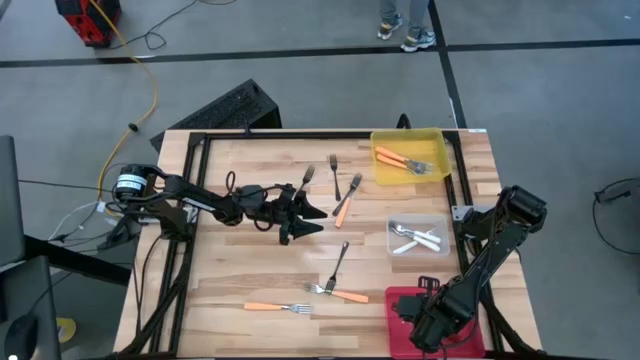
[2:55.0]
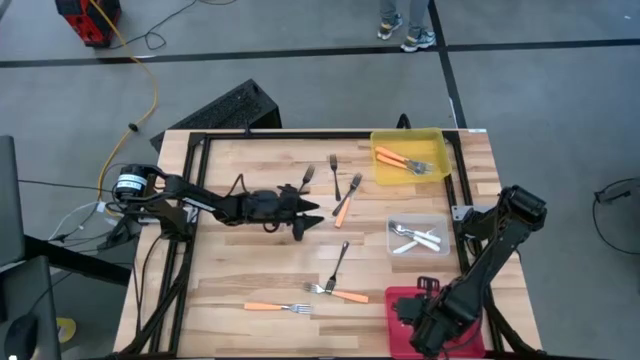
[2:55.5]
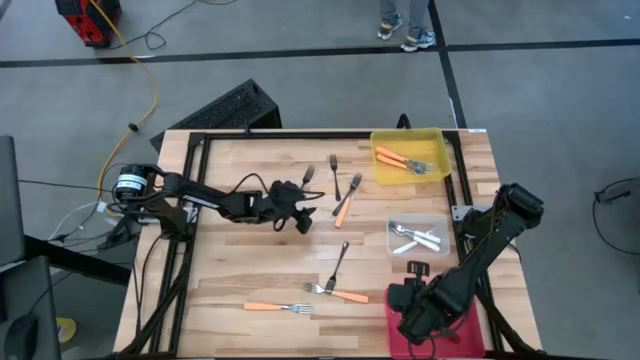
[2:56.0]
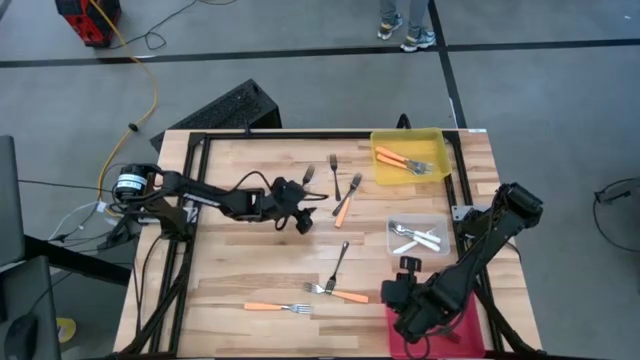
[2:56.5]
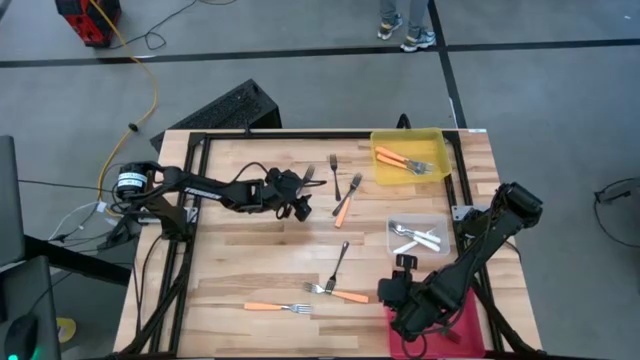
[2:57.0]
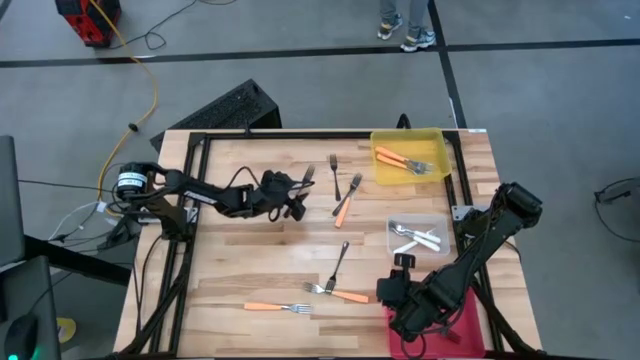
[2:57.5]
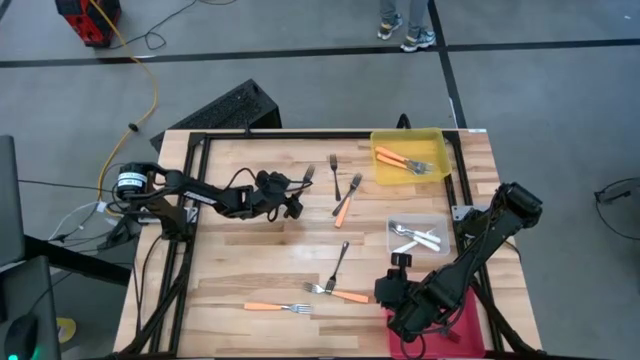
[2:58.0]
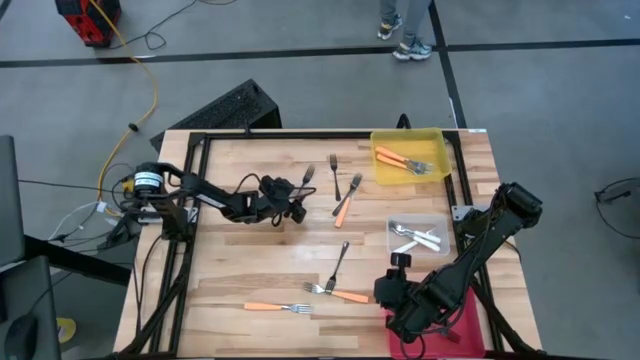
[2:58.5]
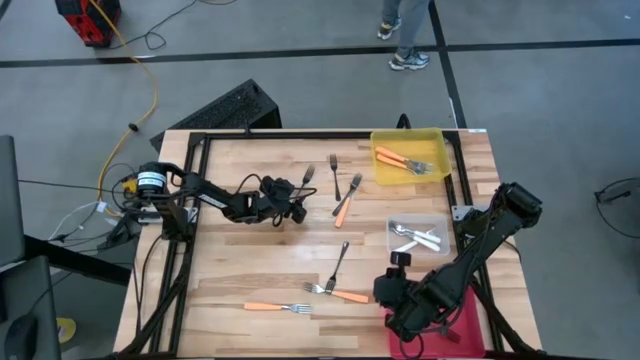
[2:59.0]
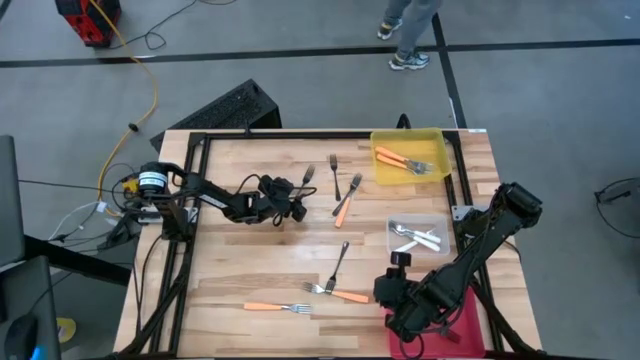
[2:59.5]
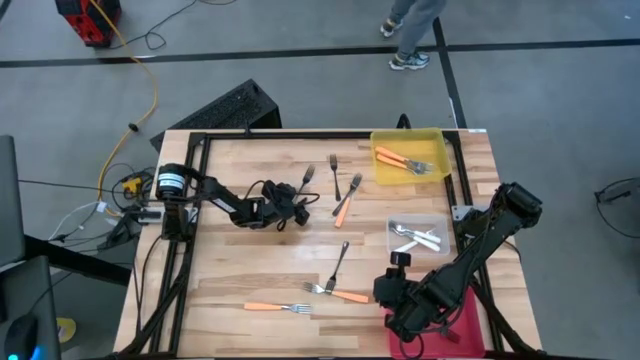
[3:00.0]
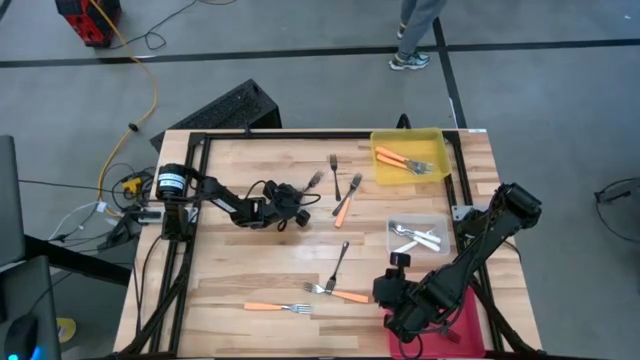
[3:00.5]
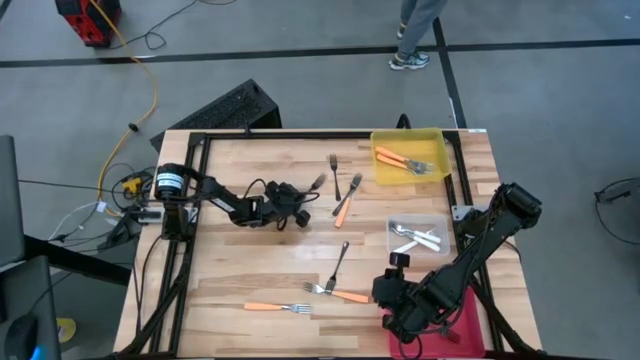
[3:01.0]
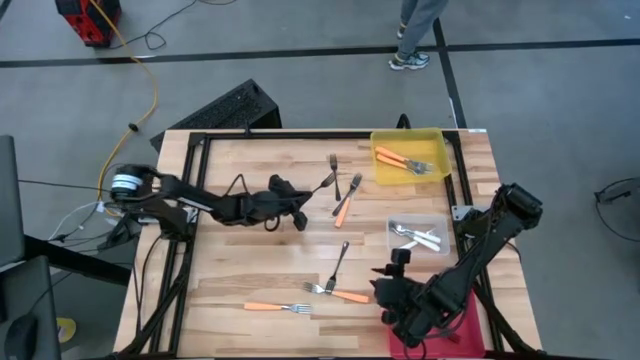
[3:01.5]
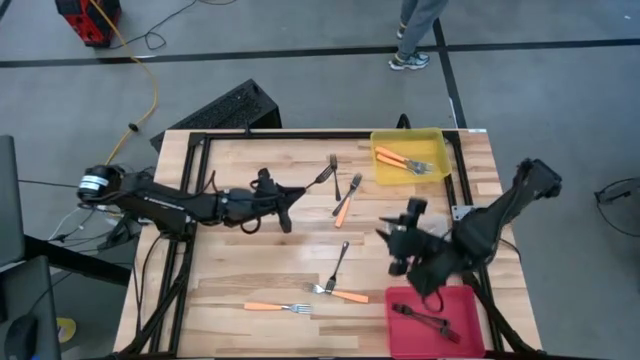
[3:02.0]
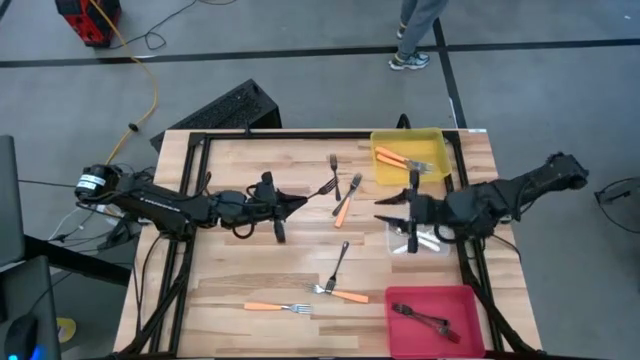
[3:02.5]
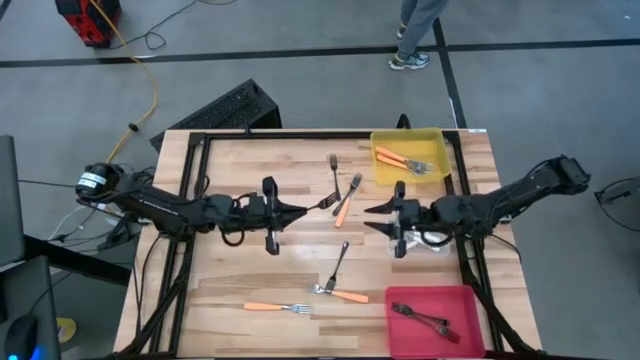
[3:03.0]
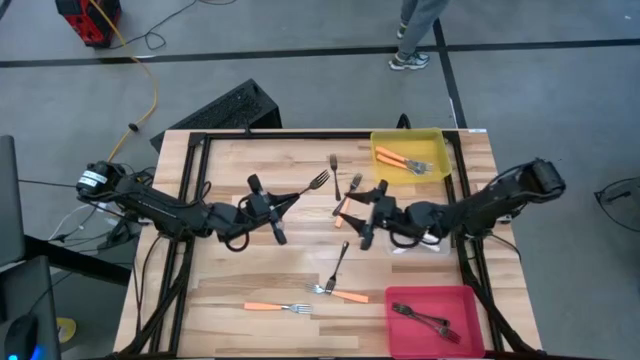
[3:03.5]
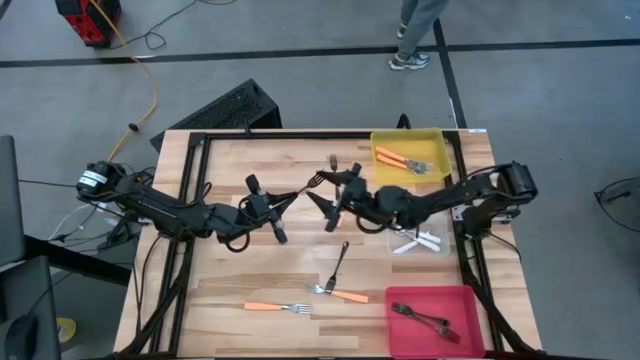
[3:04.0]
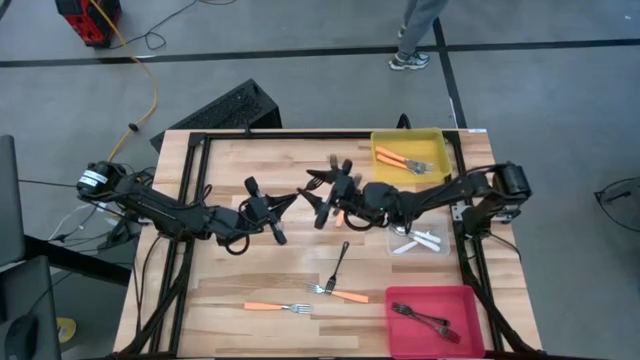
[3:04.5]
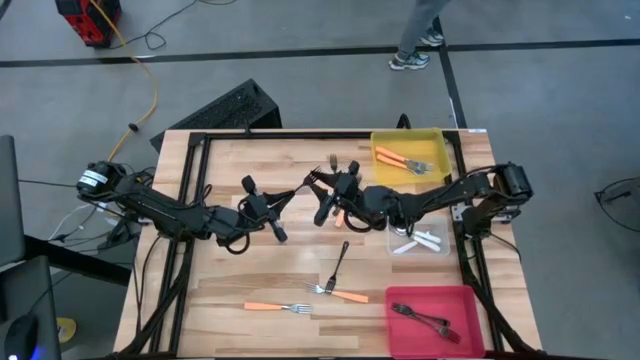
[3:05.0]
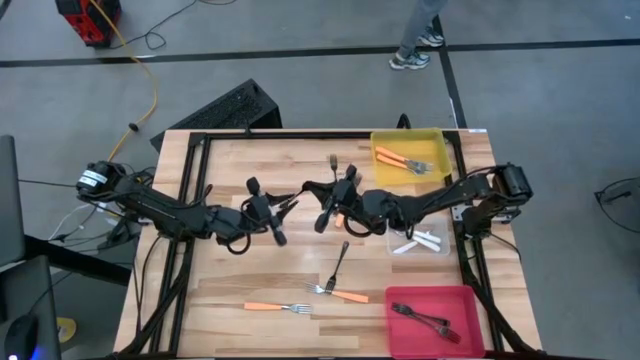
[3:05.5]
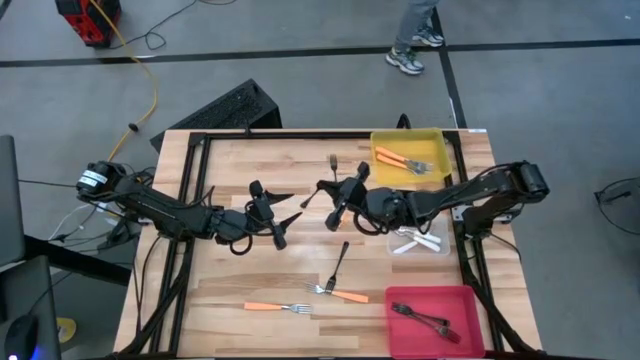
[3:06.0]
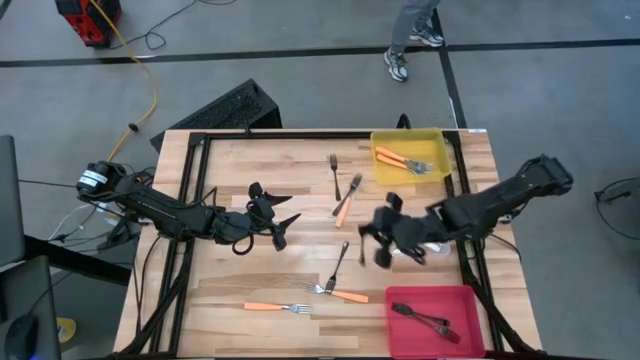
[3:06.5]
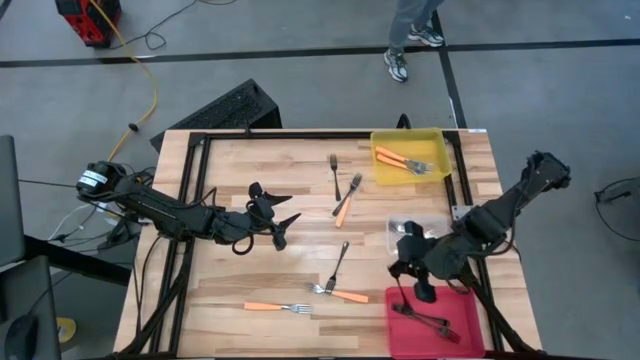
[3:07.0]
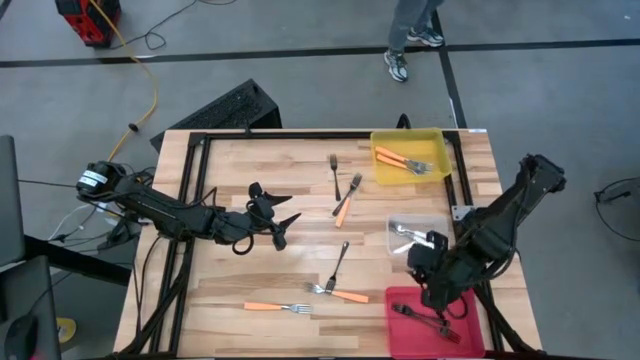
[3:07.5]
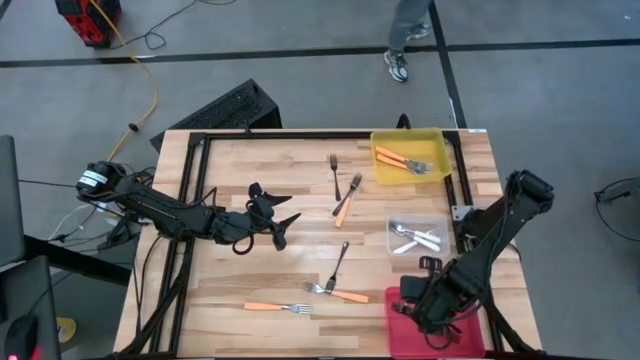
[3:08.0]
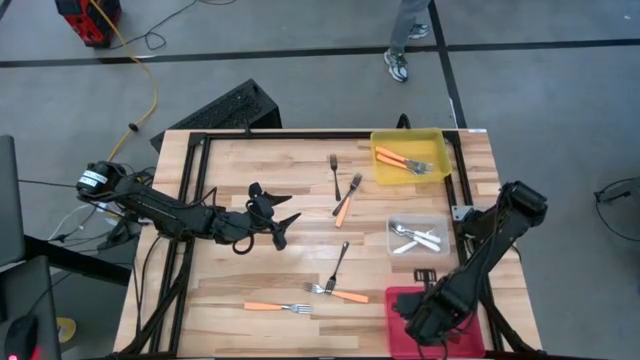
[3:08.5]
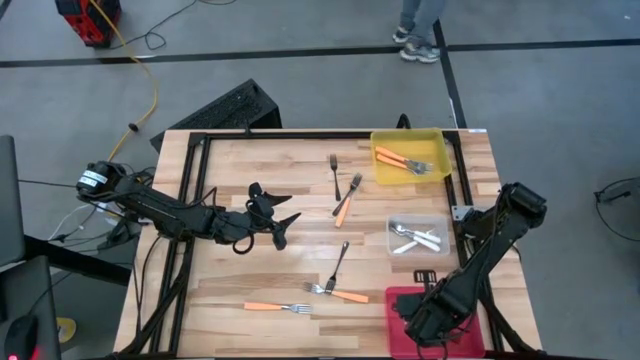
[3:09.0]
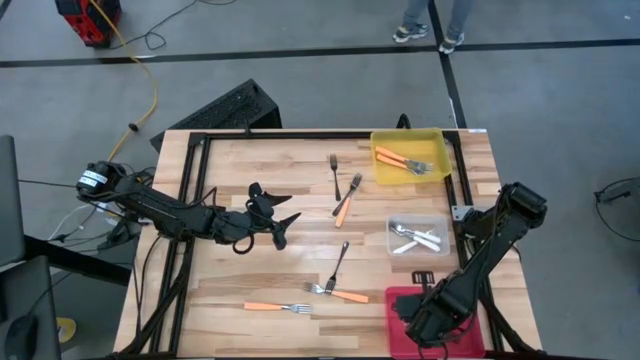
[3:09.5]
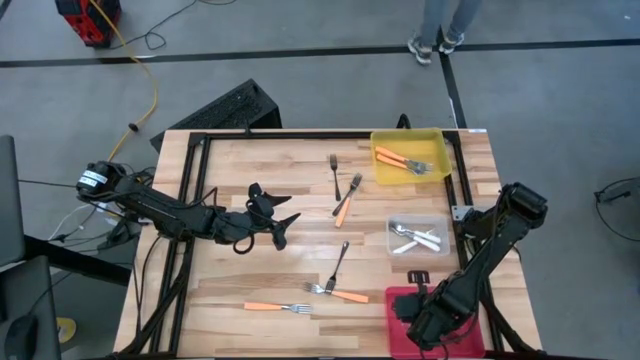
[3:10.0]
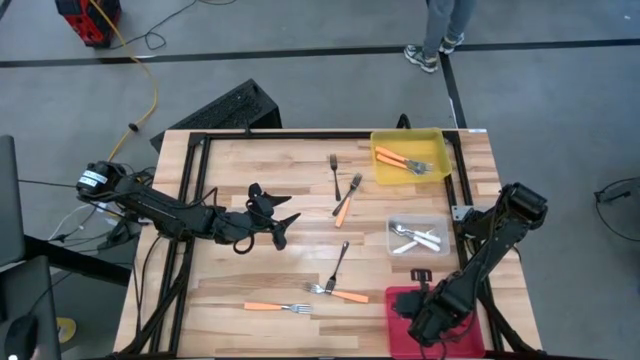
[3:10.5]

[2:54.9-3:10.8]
Task: Sort silverware by color (type)
Put the black fork into the red bin

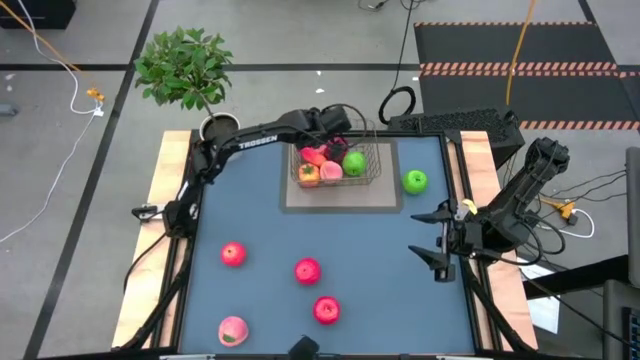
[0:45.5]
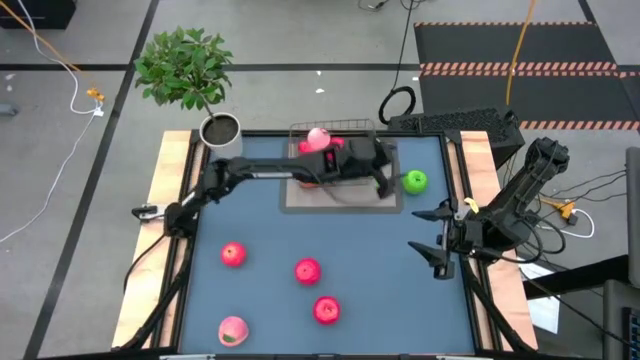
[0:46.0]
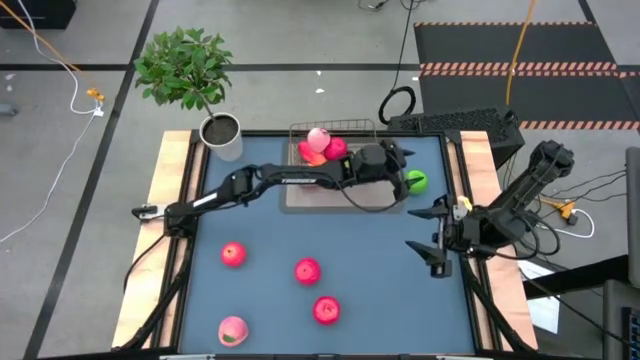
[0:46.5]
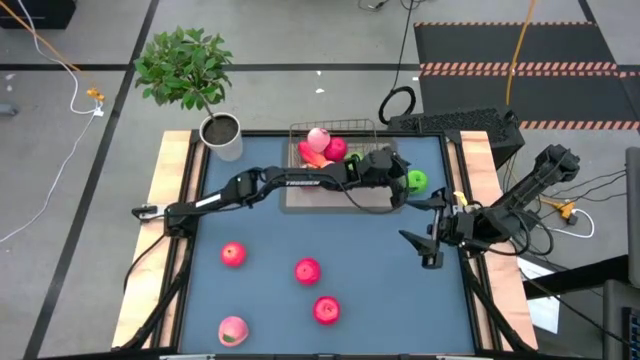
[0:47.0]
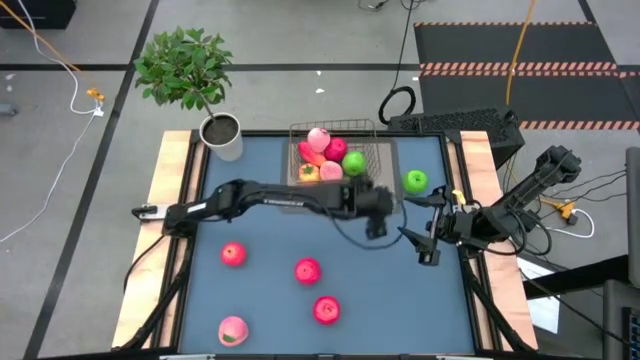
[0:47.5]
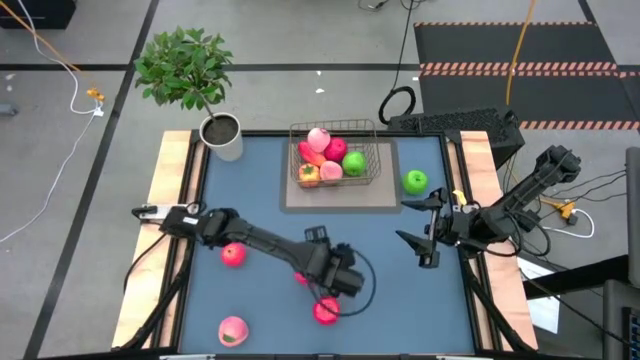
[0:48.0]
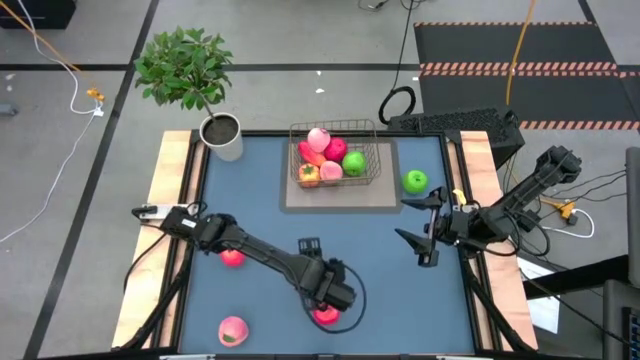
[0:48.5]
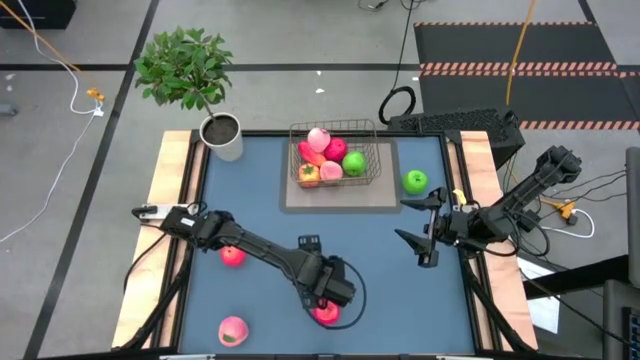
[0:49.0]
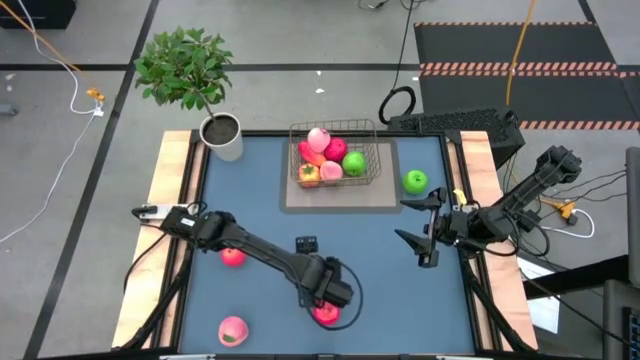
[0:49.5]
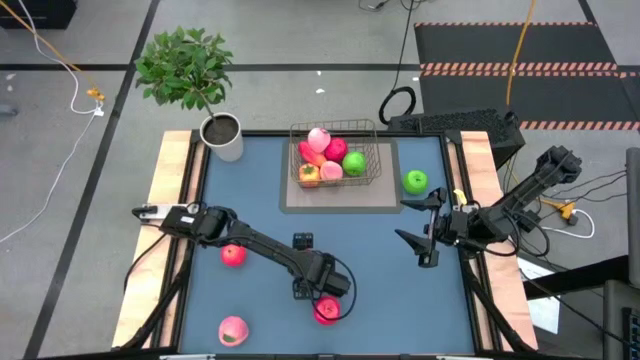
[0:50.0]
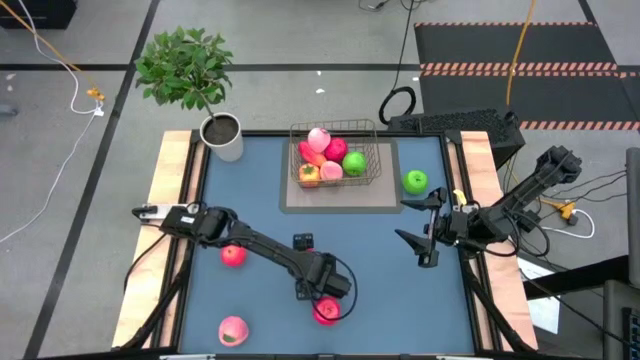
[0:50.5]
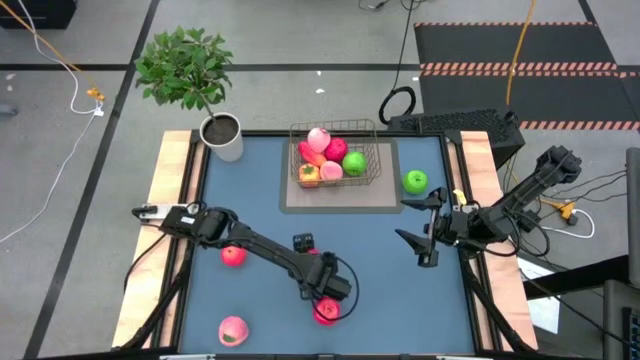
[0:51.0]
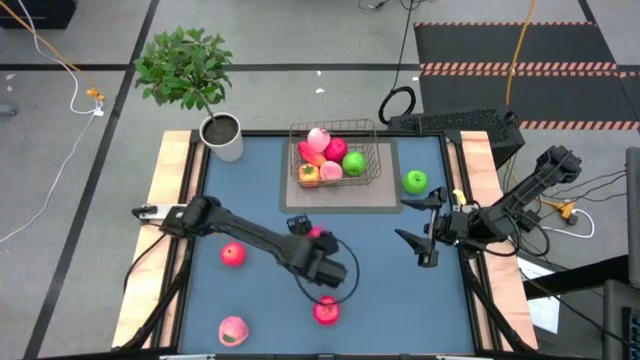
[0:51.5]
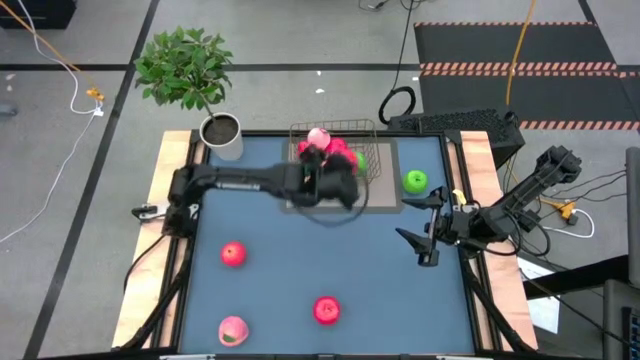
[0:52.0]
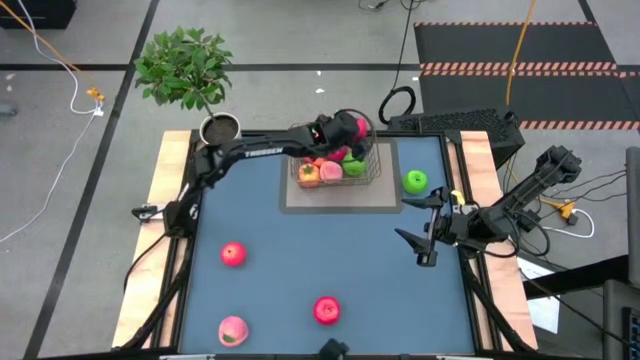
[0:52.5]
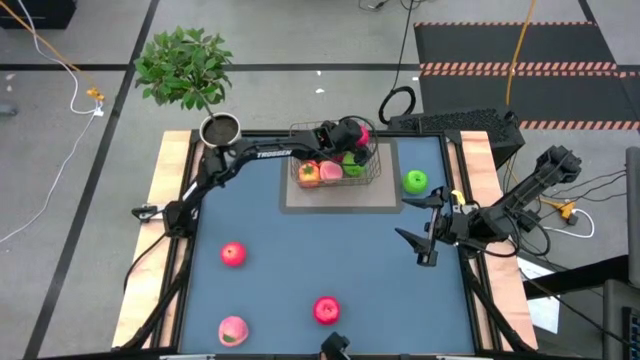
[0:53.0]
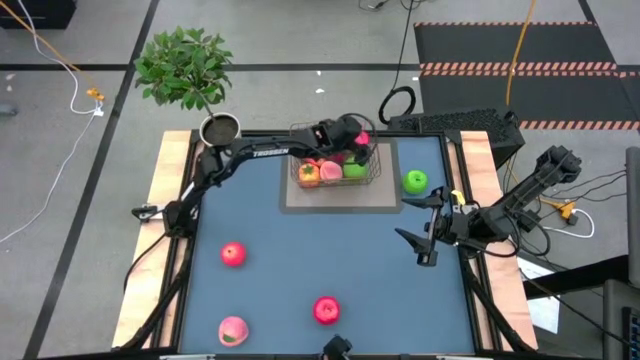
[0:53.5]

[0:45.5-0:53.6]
Task: Build produce basket
Put the red apple into the wire basket
